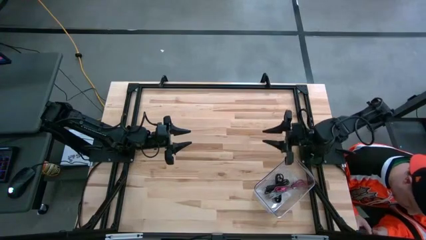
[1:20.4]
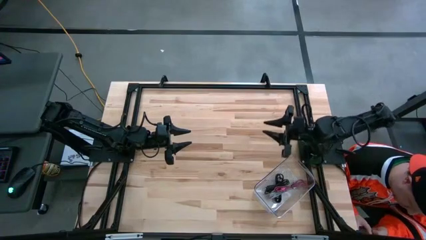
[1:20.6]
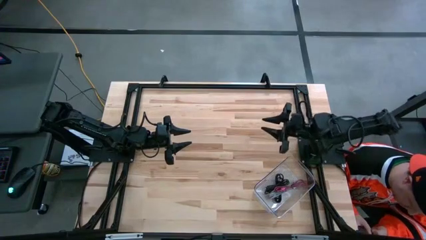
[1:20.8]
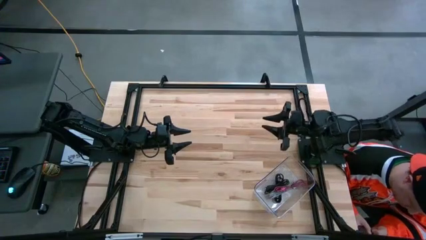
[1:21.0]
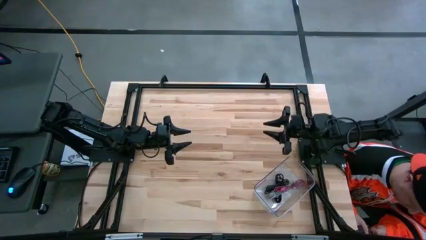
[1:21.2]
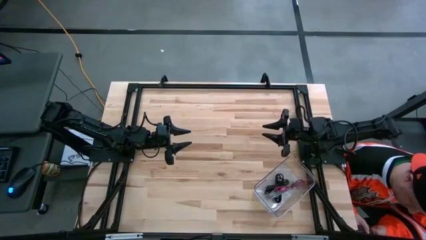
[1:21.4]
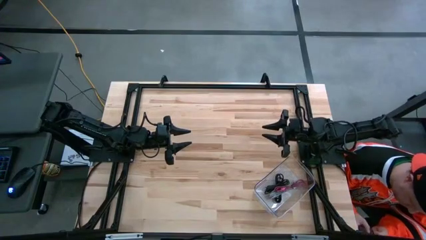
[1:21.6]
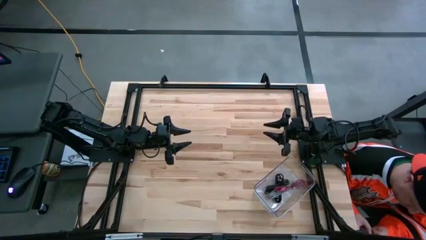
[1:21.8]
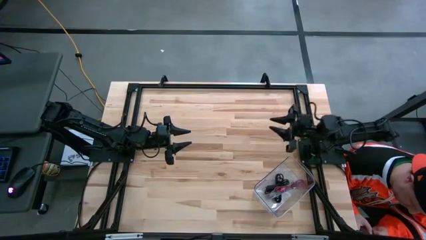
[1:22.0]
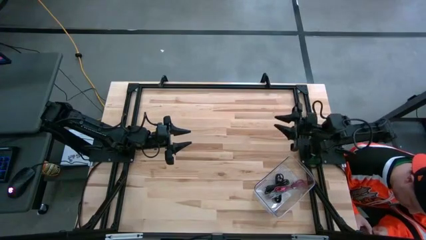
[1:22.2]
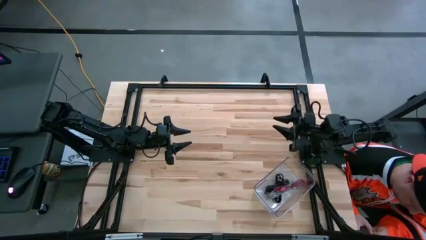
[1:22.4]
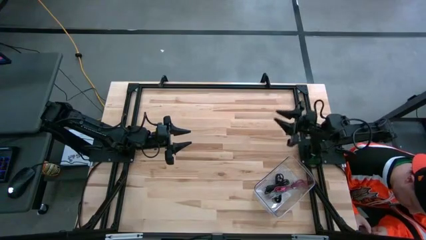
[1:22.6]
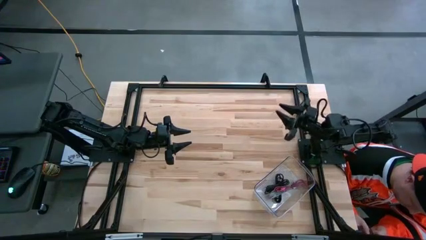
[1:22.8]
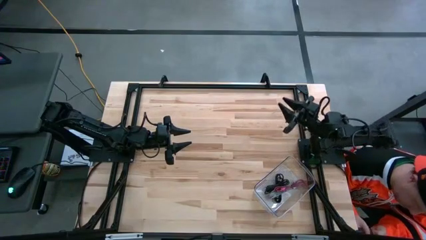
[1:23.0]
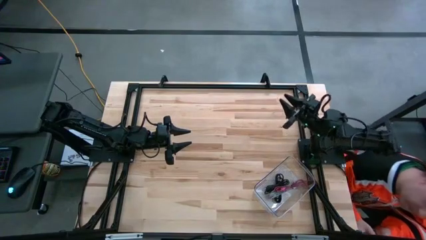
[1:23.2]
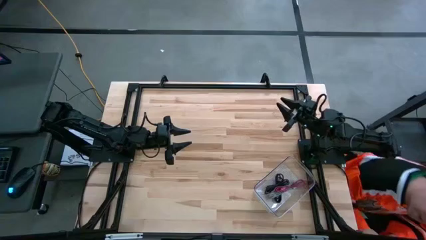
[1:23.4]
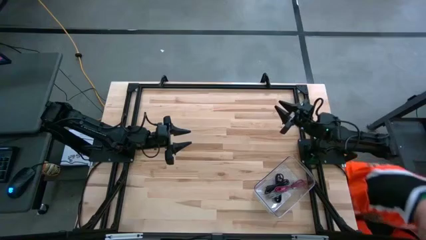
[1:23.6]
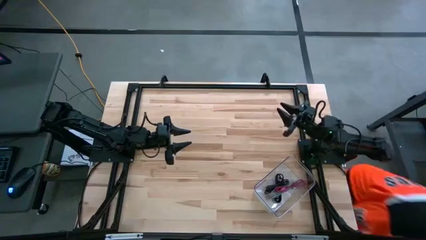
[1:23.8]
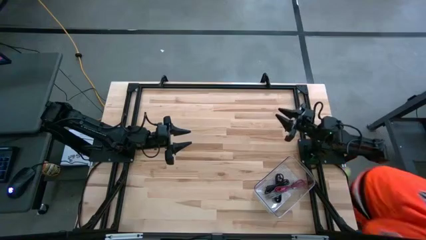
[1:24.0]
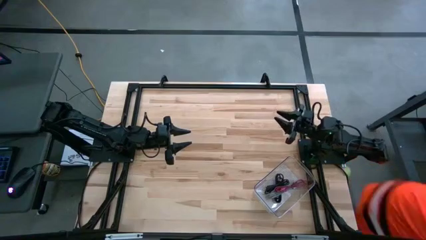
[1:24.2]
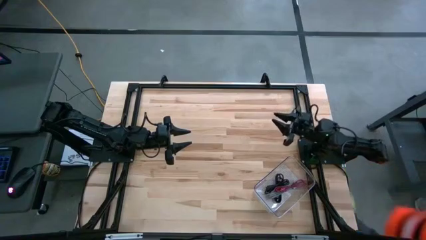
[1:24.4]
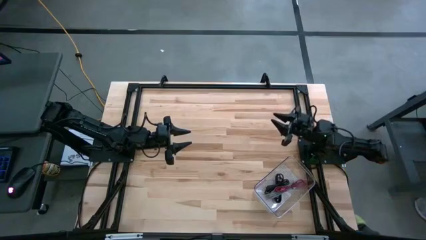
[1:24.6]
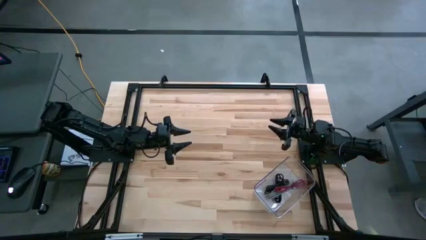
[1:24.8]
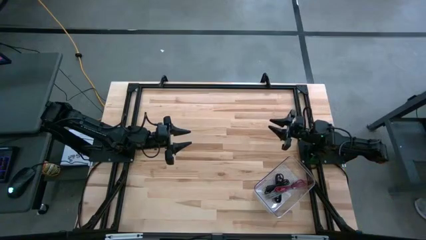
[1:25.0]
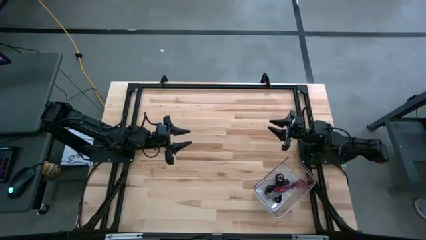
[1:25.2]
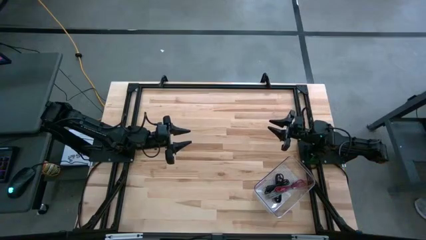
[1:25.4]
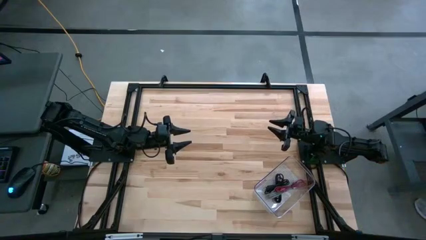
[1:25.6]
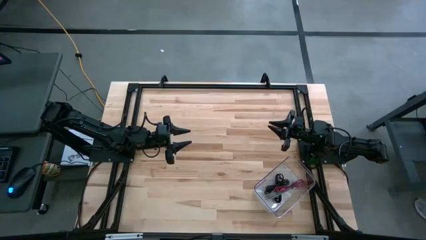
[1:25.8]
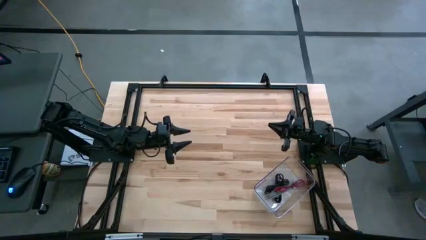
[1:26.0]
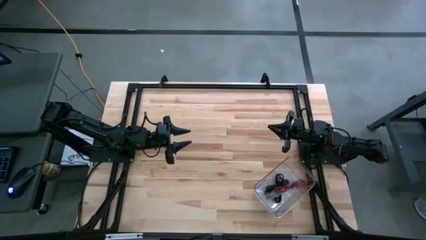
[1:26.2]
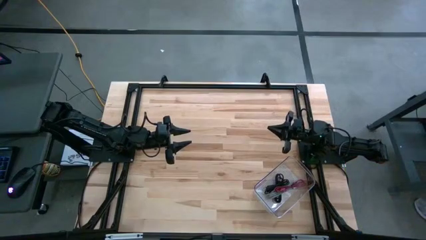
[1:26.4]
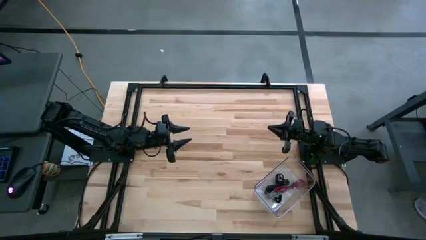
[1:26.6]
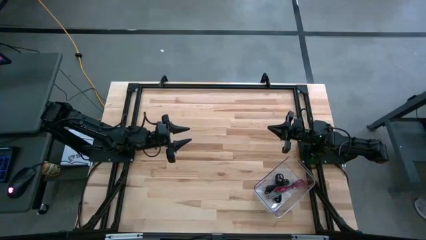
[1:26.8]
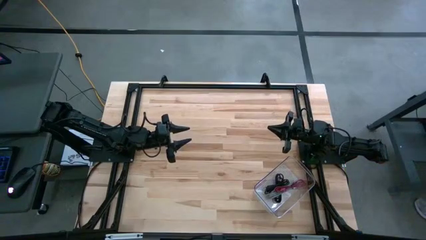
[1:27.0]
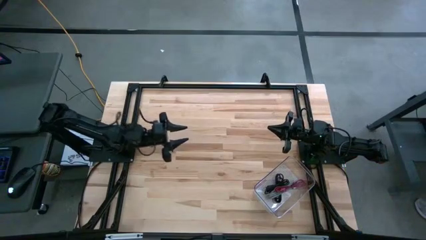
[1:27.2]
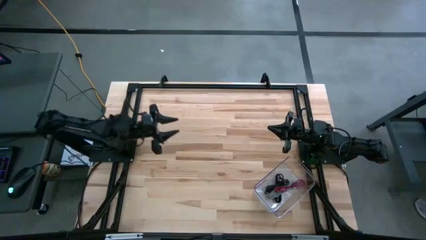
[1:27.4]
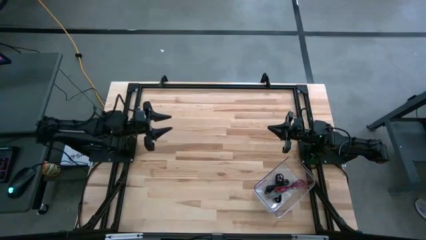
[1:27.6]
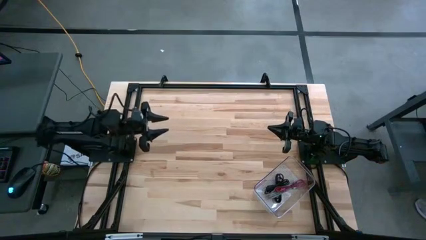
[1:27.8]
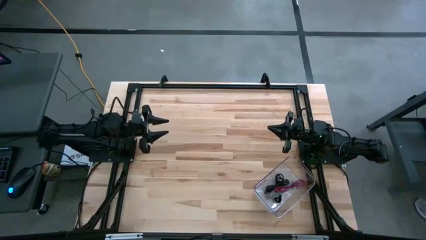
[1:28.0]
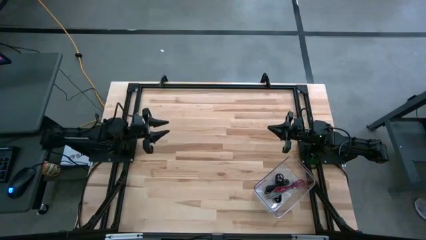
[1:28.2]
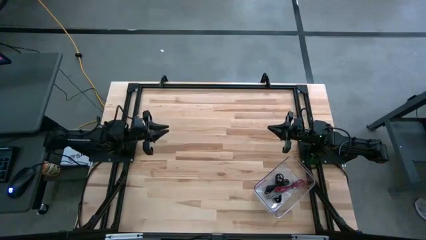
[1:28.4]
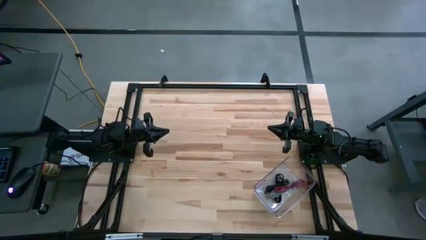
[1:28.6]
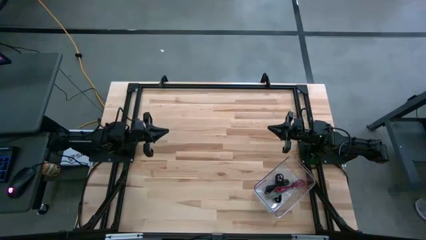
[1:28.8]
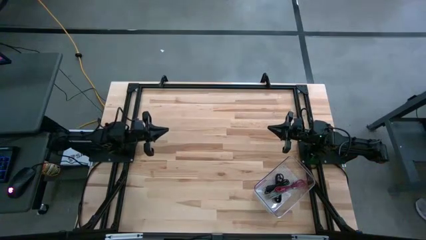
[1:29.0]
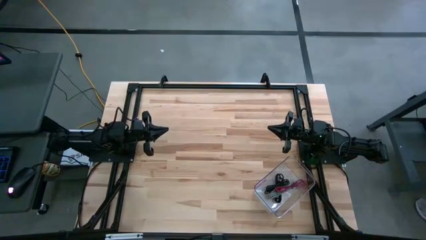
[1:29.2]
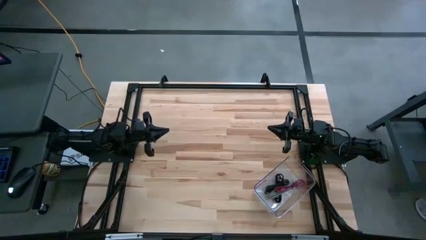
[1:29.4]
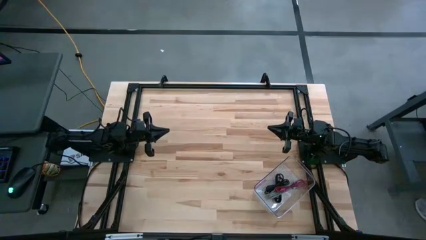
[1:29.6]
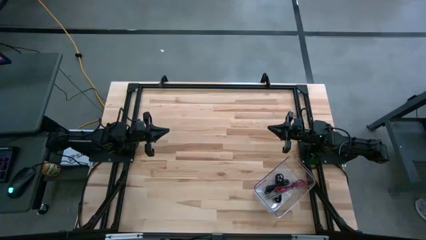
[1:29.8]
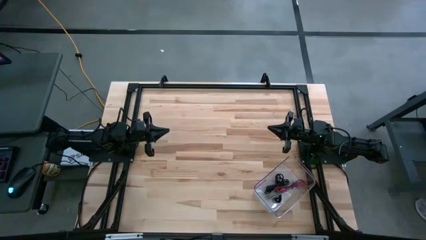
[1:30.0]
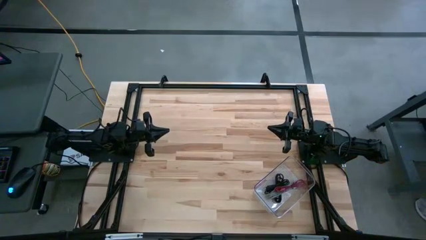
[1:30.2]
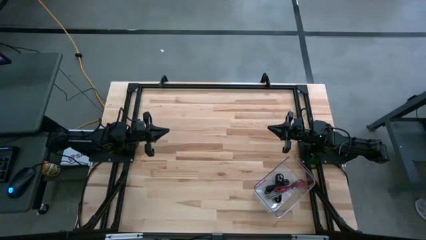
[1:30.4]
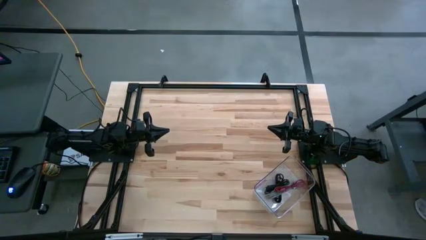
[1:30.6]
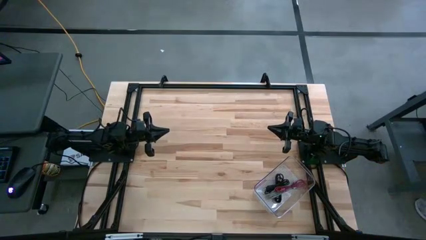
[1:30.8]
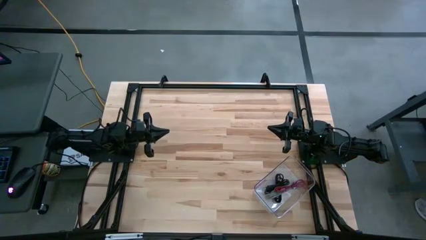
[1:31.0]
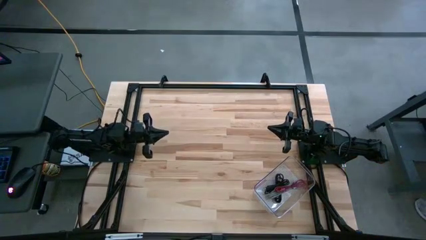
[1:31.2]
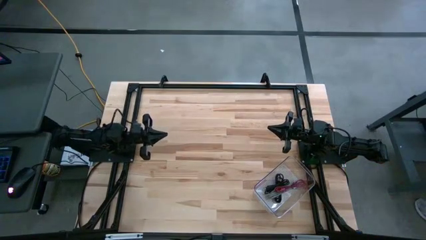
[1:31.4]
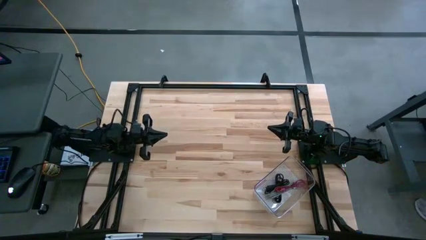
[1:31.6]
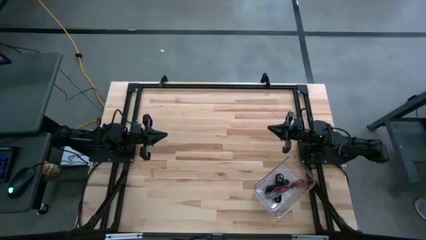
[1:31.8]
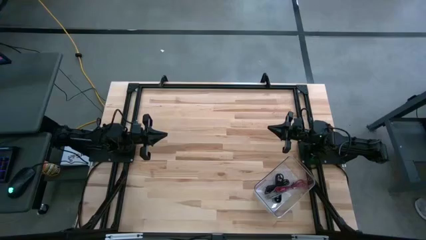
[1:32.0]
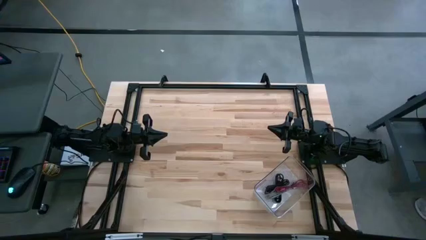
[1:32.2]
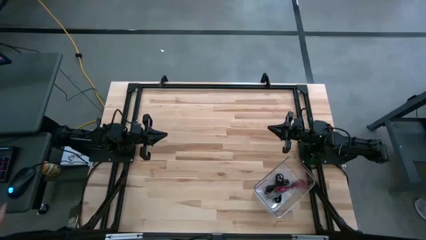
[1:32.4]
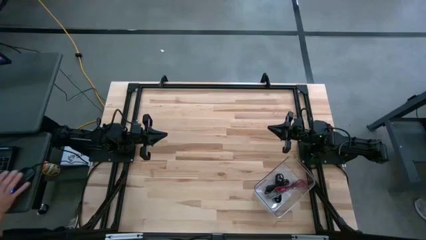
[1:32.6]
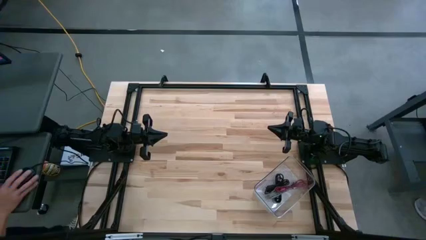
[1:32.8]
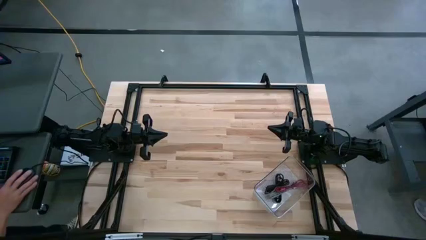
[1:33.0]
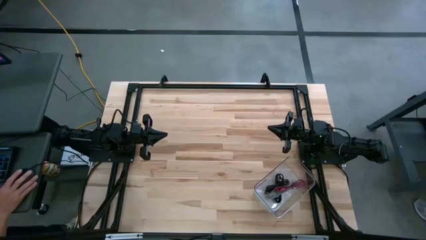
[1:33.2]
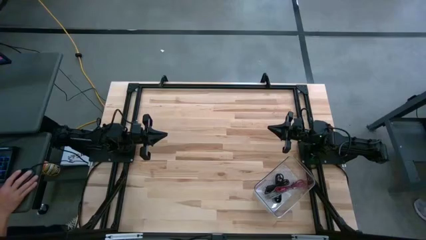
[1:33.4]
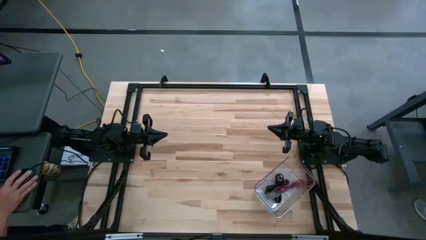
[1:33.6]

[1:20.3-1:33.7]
Task: Pick and place USB-C Cables
Return to Home Position
